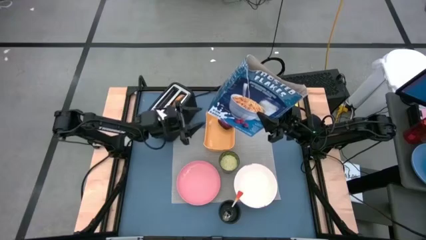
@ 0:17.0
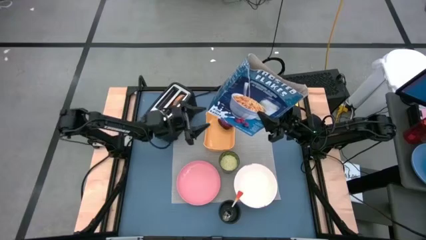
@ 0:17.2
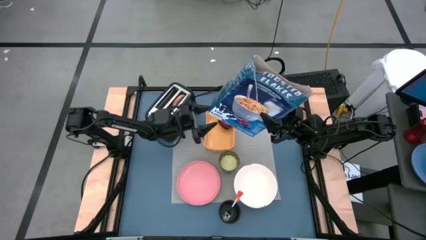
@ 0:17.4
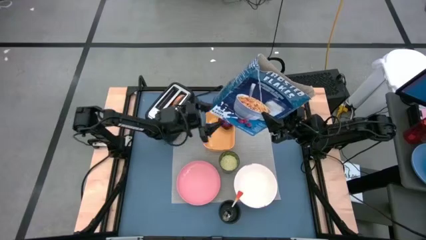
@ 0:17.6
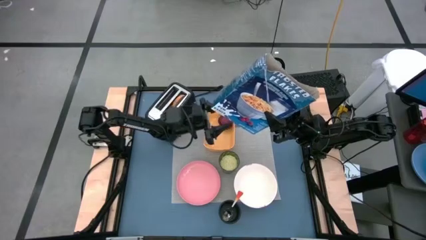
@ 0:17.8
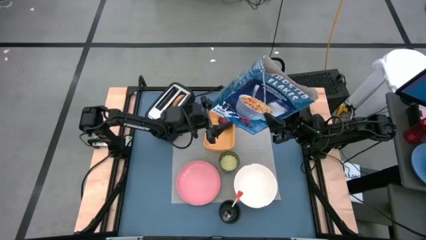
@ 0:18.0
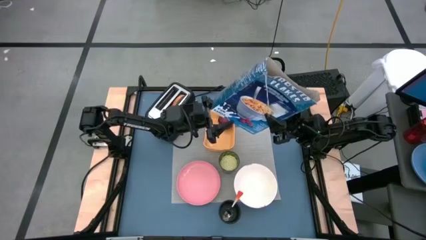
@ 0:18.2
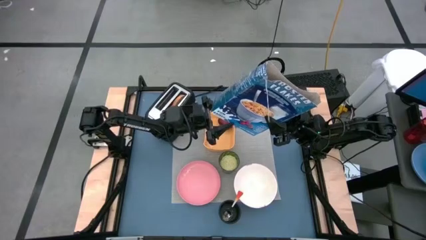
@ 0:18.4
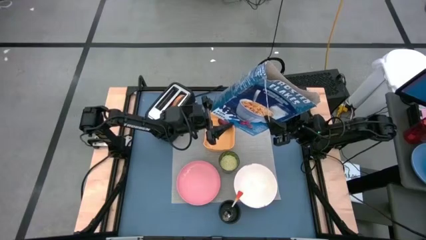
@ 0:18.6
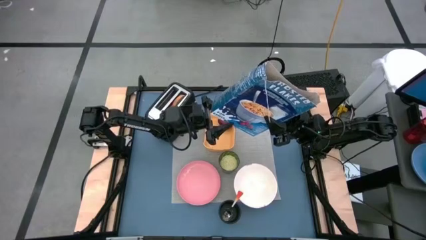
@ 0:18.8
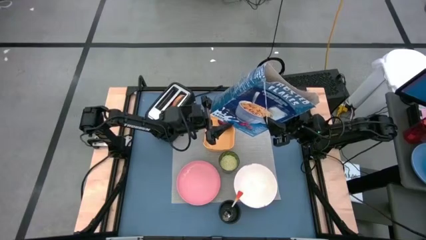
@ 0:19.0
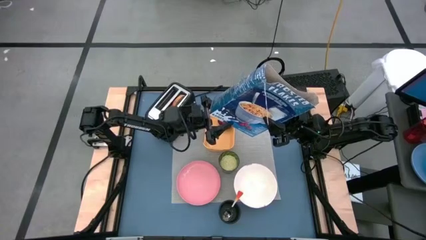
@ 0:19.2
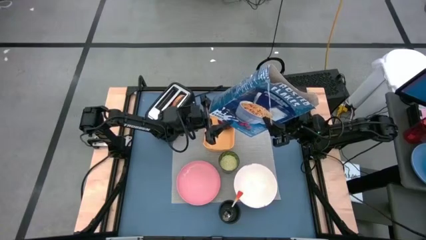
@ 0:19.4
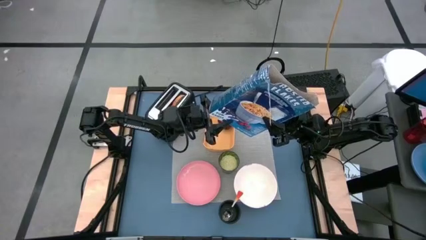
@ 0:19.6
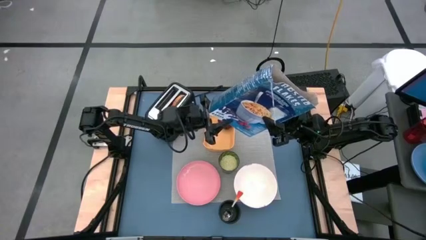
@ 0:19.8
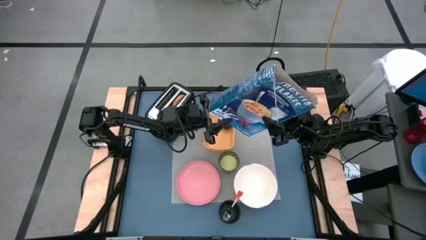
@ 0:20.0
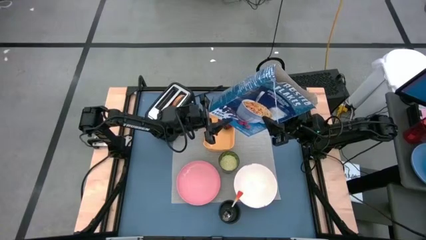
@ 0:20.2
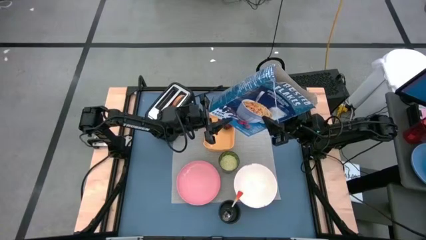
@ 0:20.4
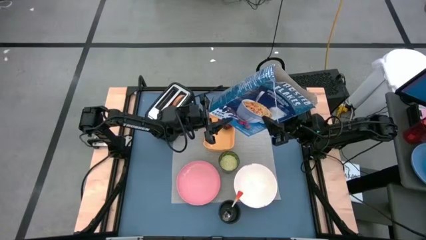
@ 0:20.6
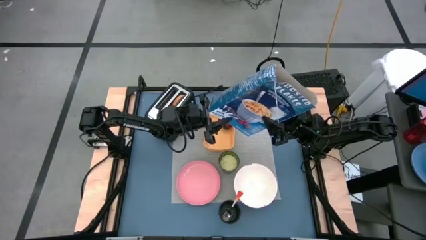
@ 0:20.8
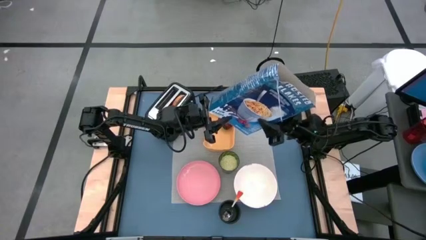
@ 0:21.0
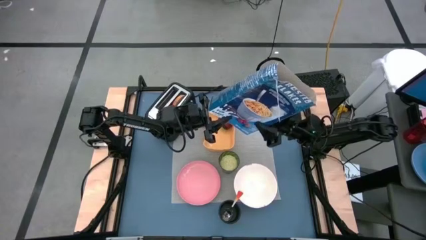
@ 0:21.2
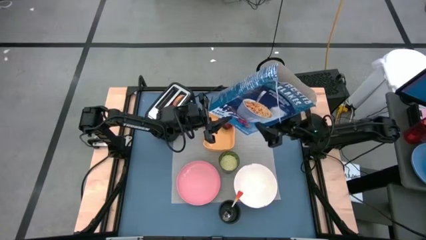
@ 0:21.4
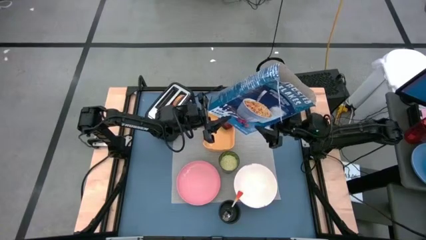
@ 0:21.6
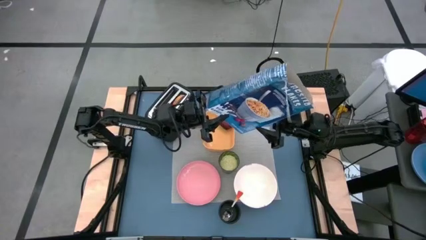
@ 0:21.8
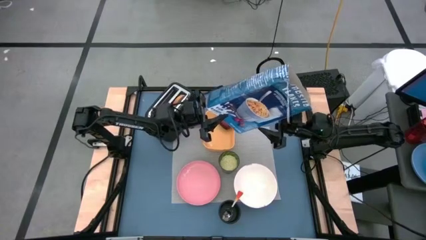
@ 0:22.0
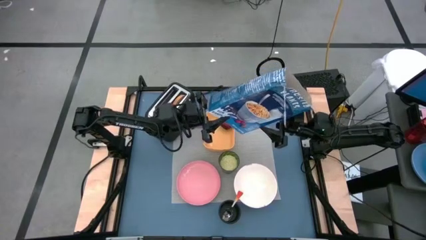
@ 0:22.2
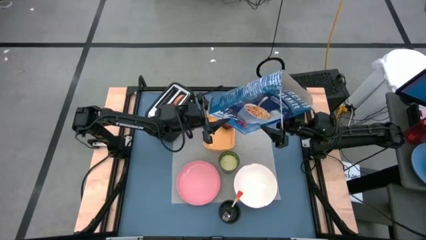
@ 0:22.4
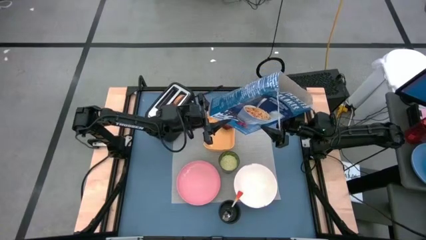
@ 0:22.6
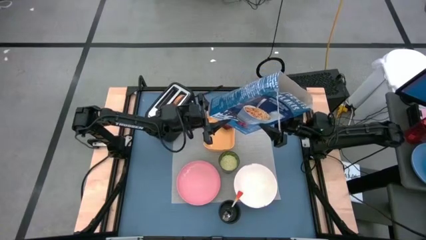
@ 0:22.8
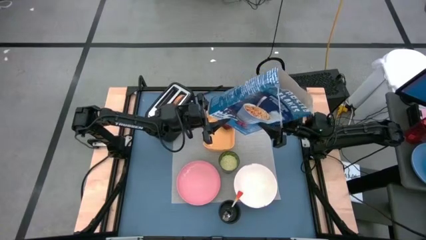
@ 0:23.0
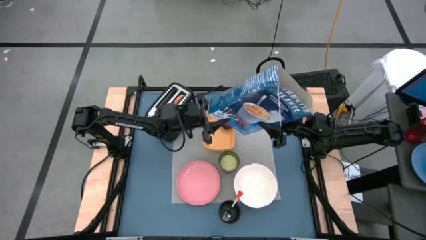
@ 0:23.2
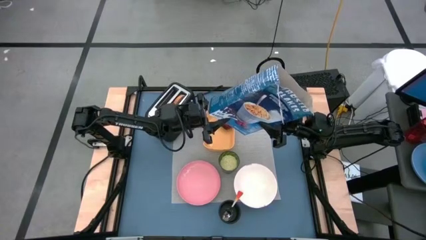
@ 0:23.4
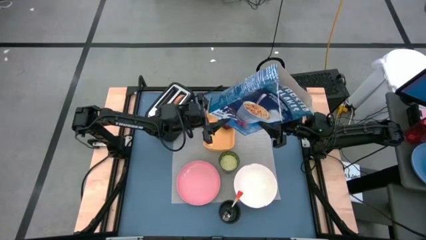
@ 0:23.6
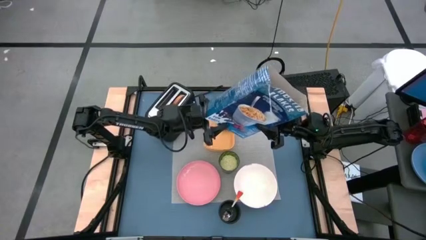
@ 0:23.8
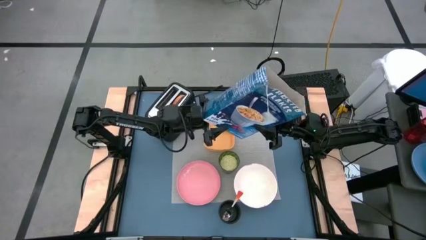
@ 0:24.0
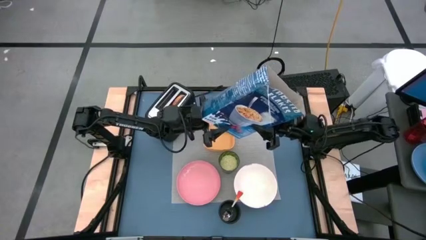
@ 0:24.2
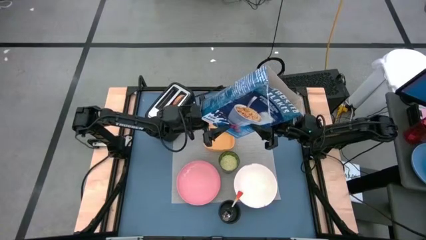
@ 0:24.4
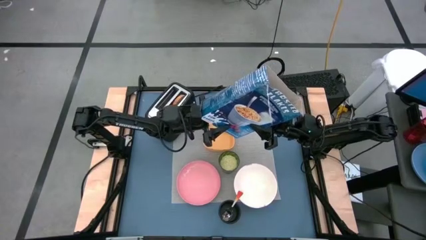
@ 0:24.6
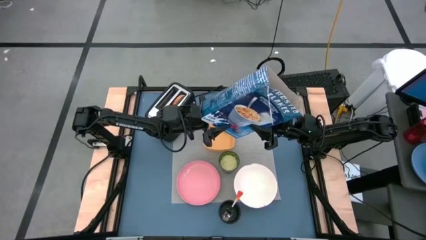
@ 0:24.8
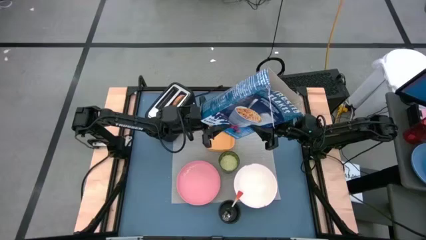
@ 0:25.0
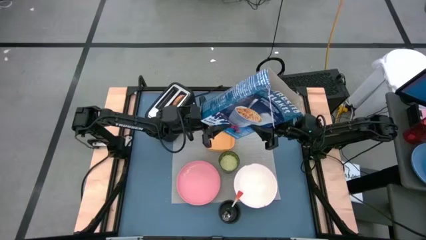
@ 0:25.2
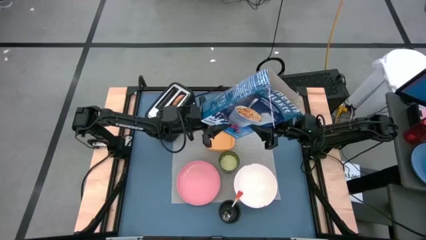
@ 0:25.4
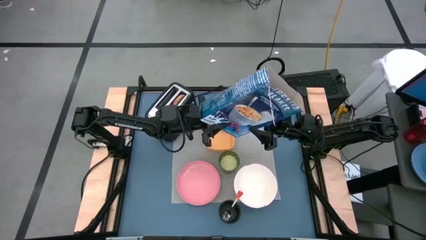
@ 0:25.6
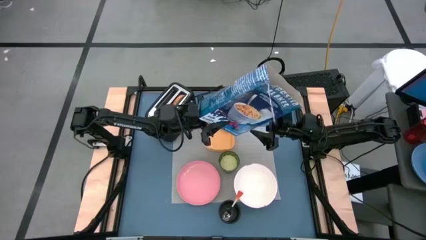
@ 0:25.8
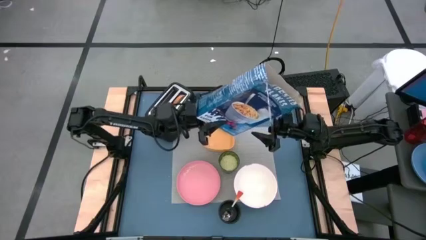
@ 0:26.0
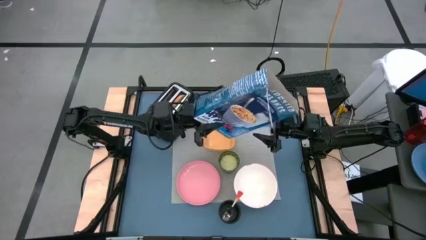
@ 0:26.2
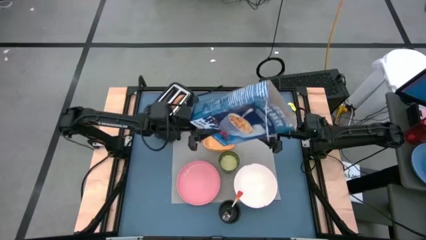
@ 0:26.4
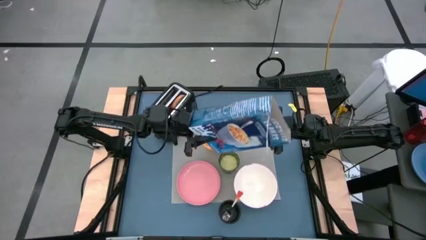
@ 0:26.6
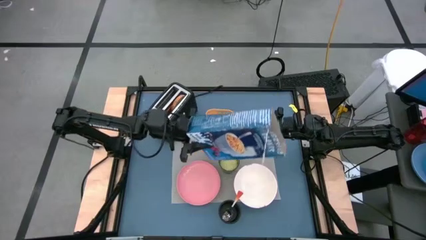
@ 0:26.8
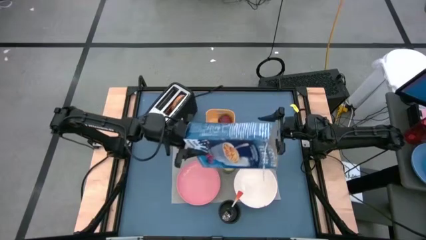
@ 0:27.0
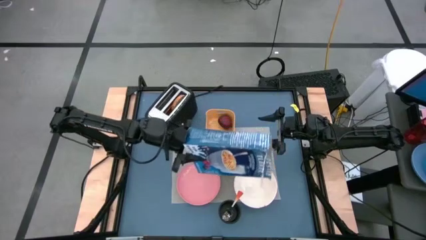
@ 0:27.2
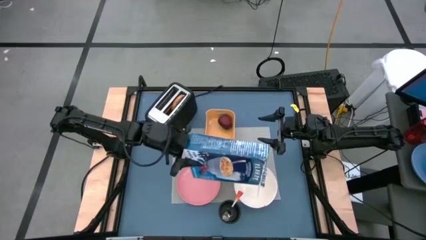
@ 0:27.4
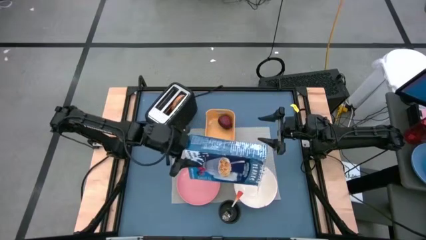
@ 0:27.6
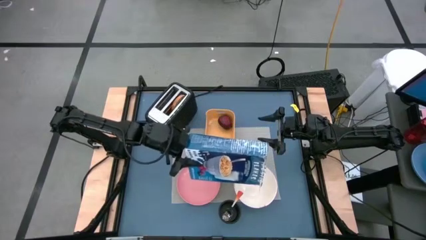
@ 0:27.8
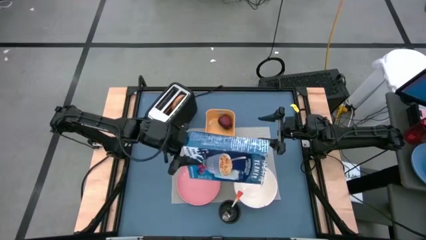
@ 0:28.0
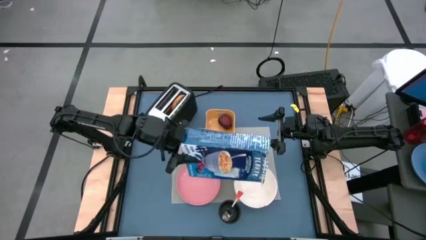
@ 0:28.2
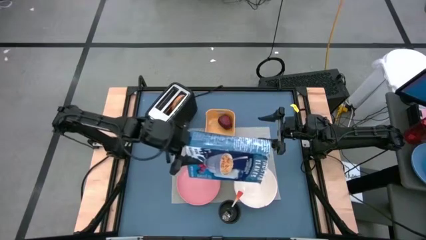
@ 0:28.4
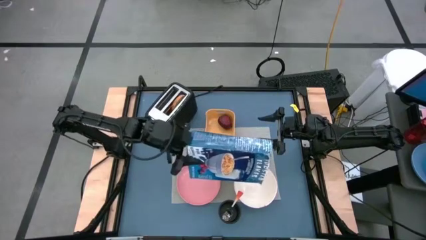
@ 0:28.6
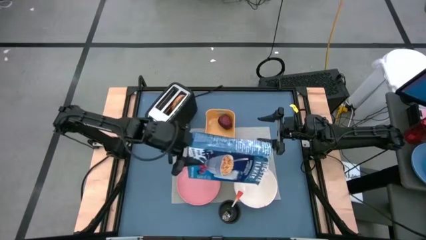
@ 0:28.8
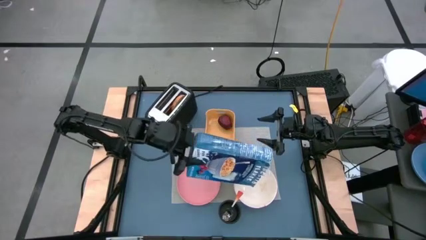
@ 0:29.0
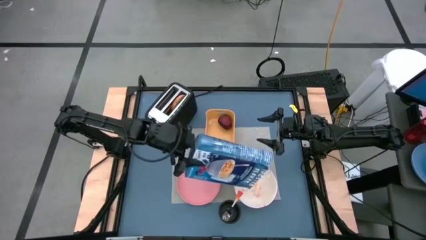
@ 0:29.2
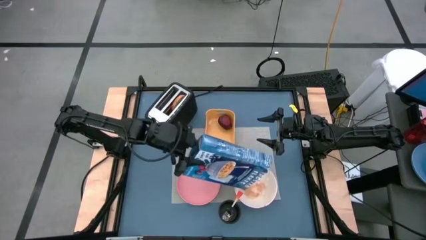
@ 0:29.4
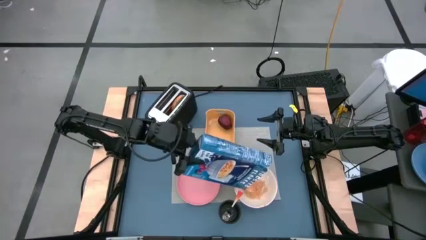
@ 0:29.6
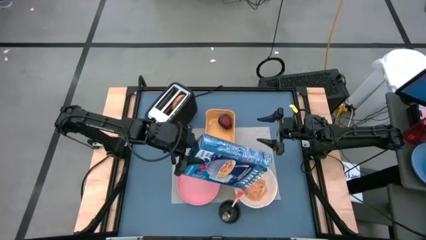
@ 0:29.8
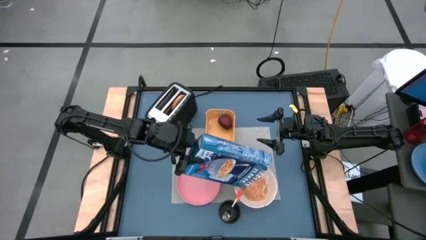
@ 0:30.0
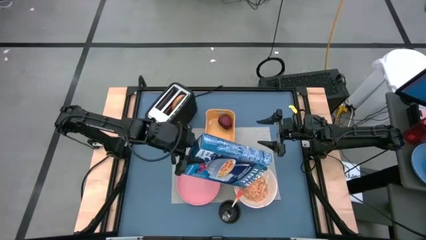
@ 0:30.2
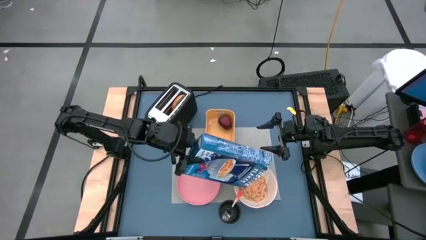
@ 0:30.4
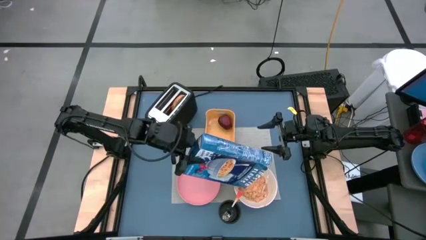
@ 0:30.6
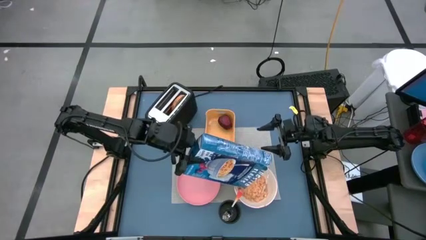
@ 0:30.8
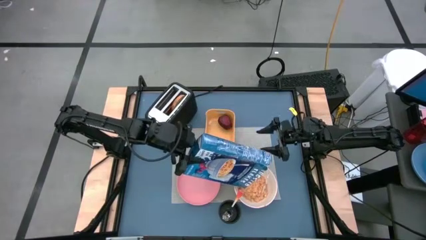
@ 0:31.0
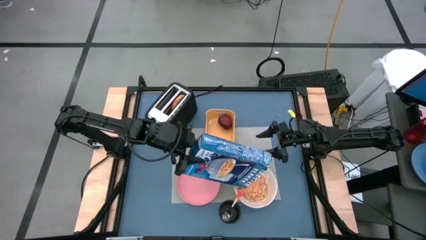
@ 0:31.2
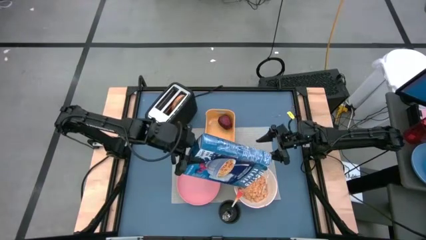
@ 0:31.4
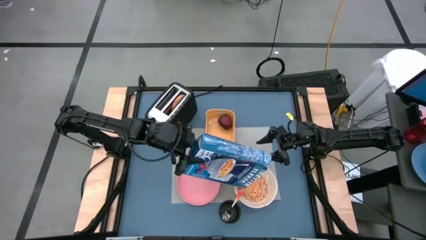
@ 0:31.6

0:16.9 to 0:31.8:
Task: Arrange a breakfast setting
Pour the cereals into the white bowl
